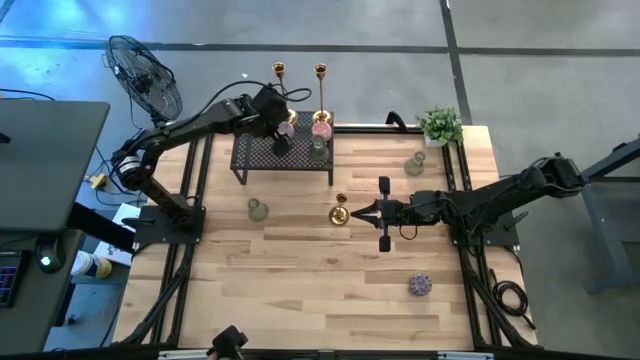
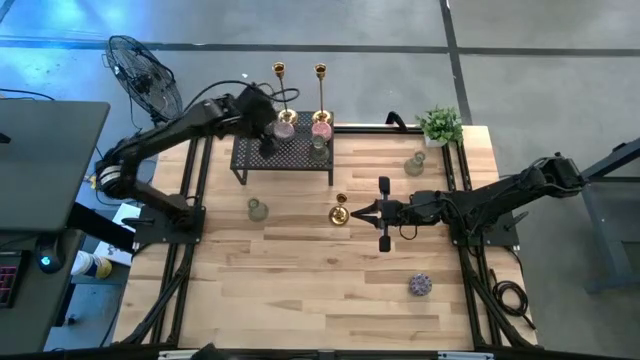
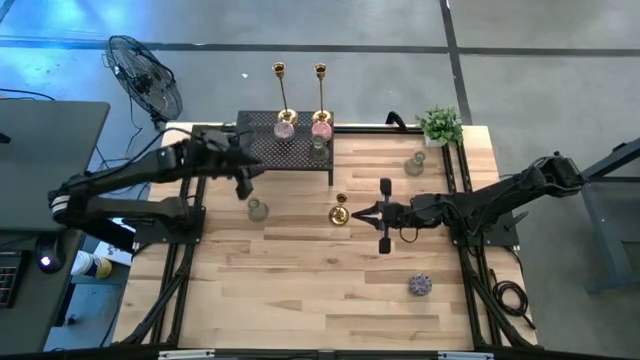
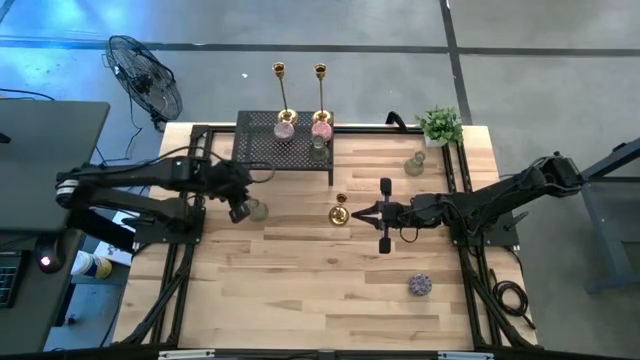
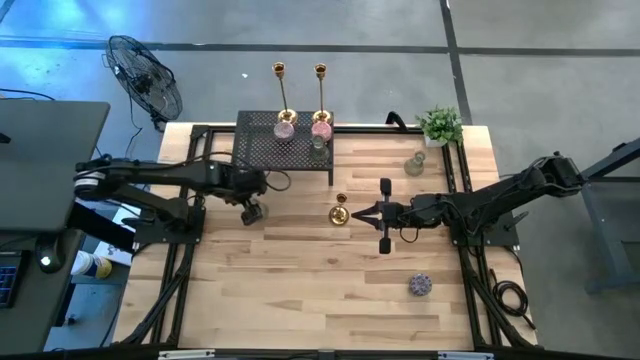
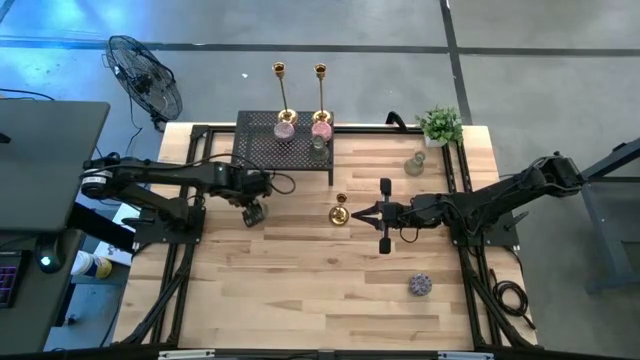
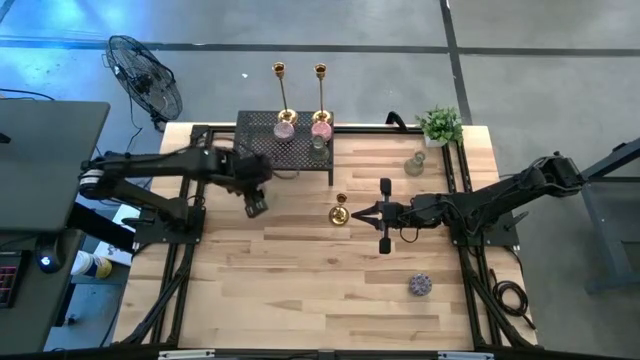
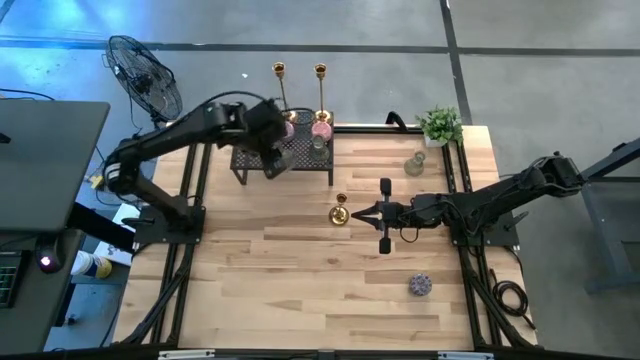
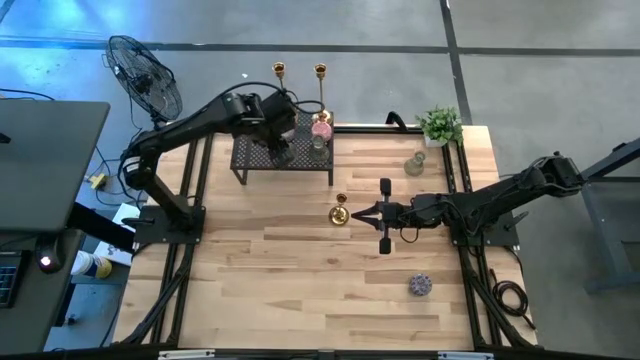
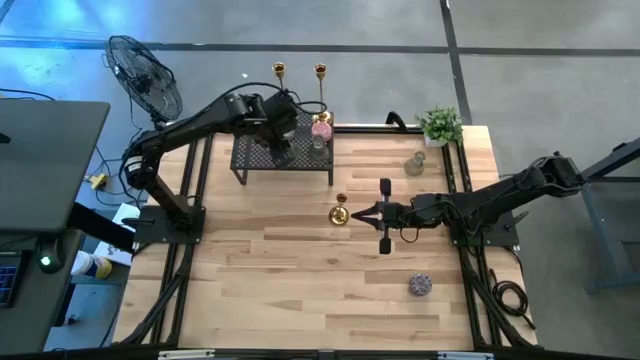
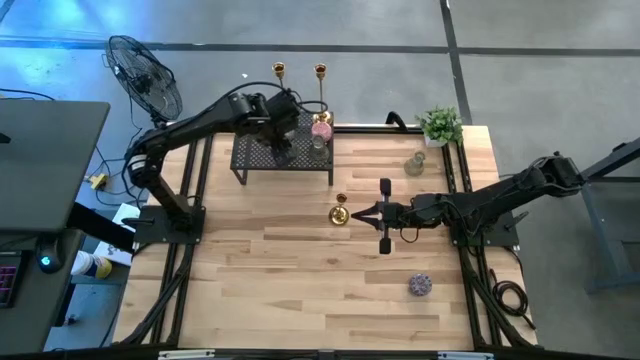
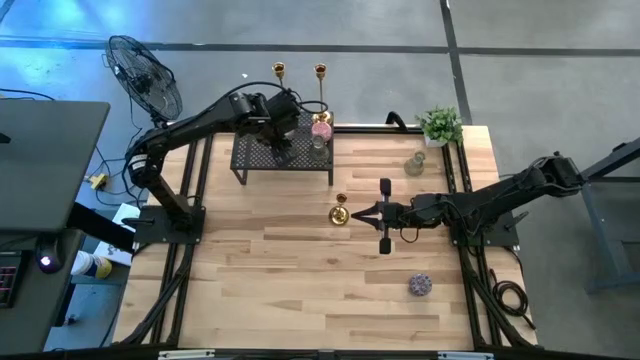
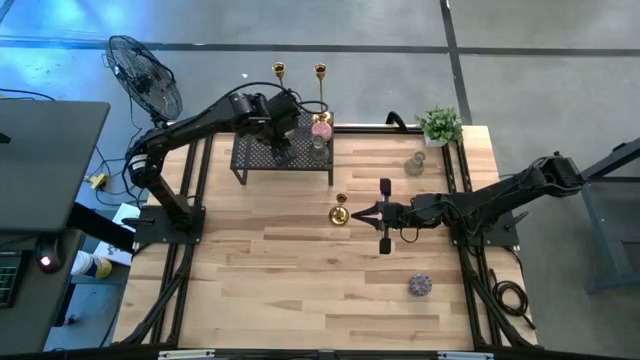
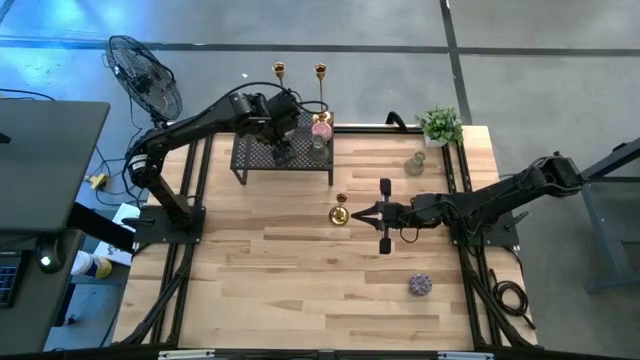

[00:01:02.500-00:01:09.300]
Task: Pick & Place candle stick holders
Put the left green glass candle holder on the shelf

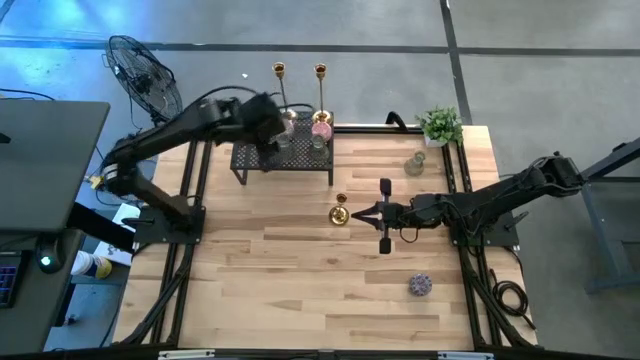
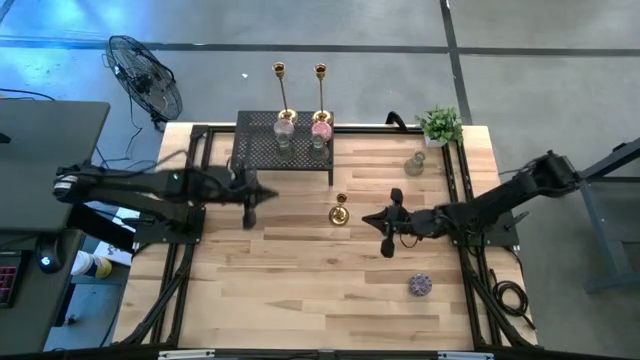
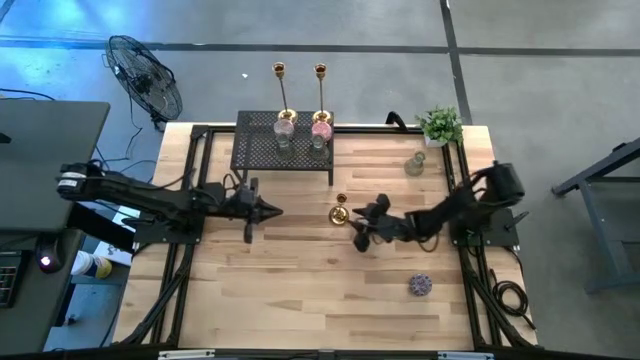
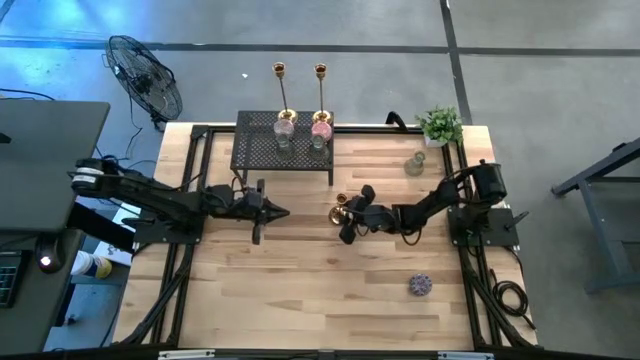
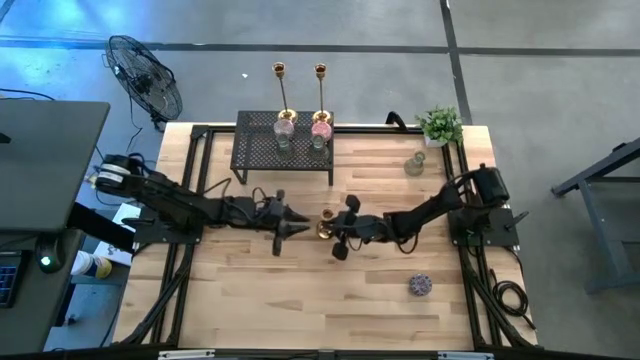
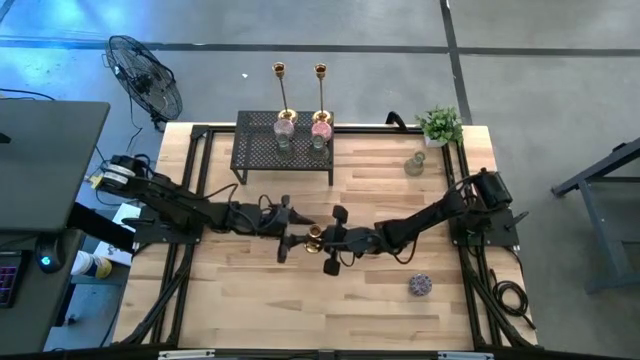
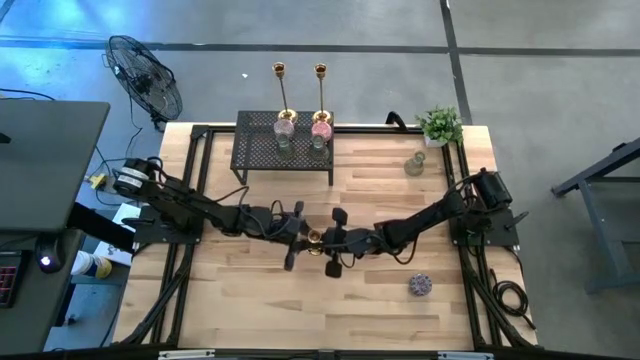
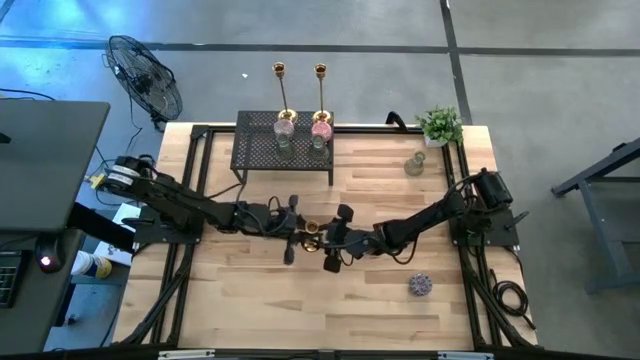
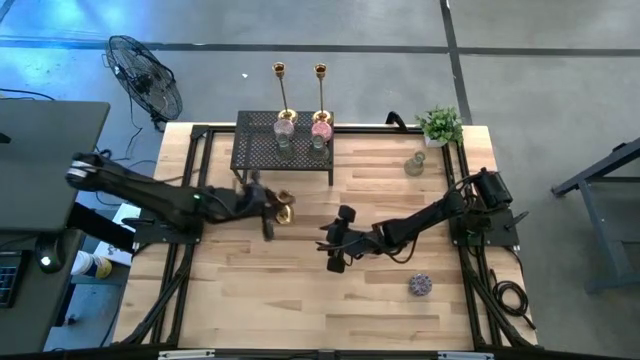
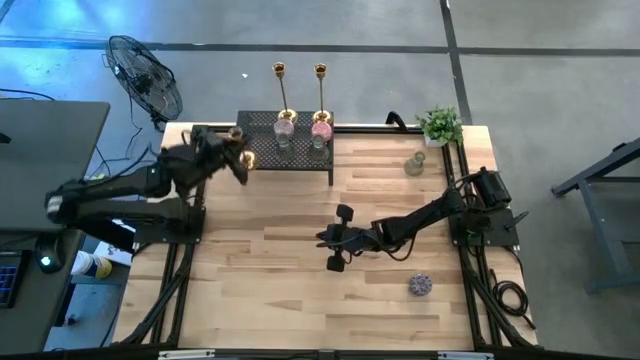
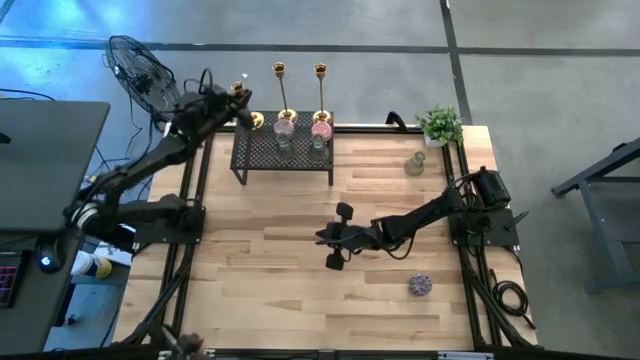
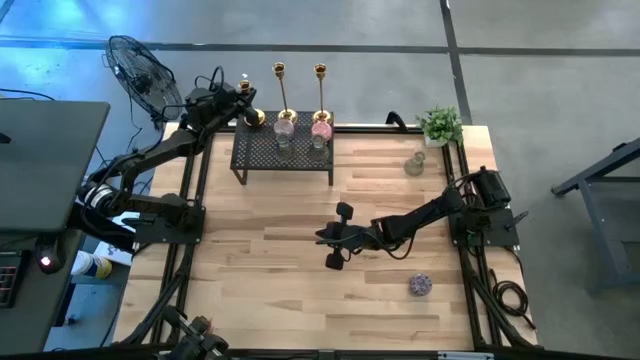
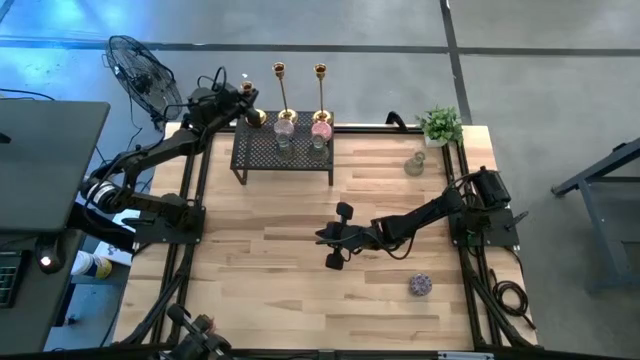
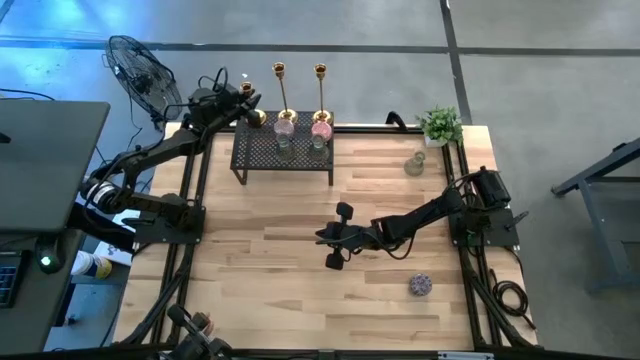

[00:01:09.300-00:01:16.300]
Put the gold candle holder on the shelf

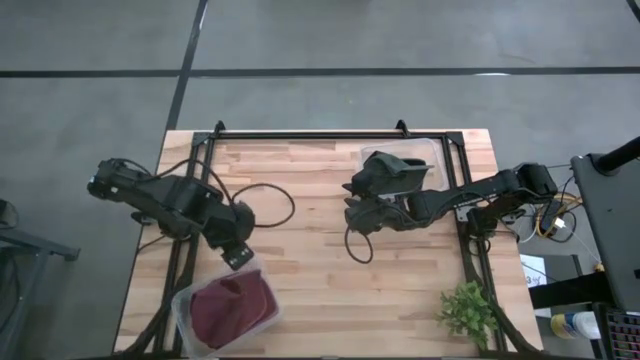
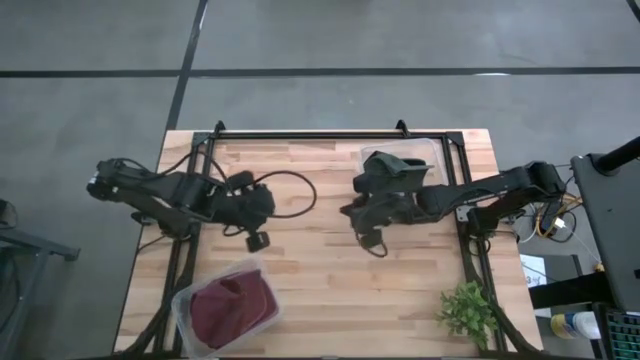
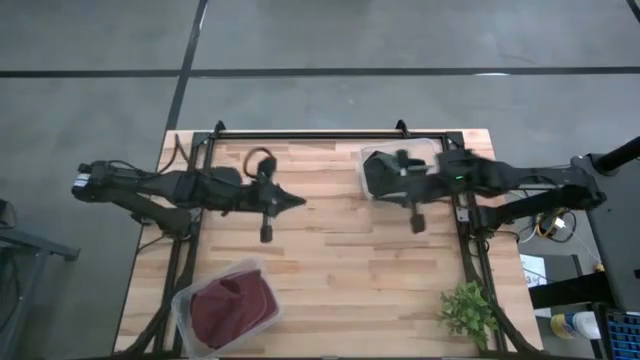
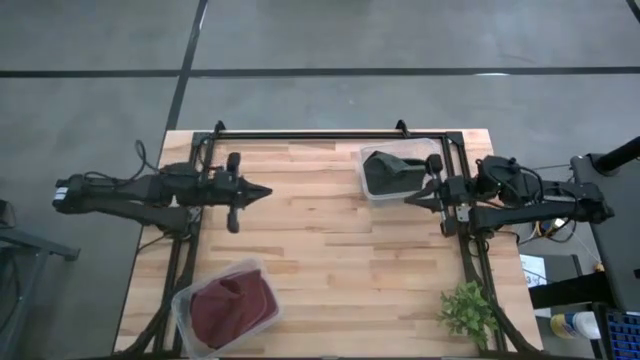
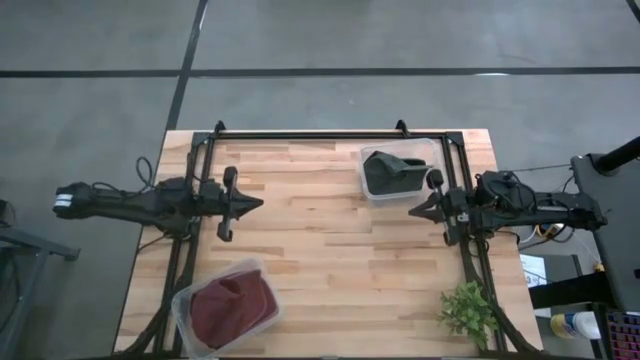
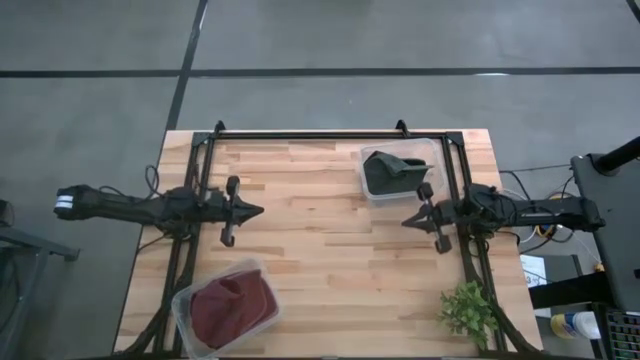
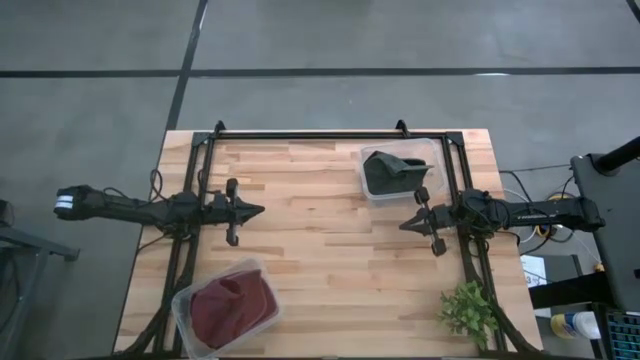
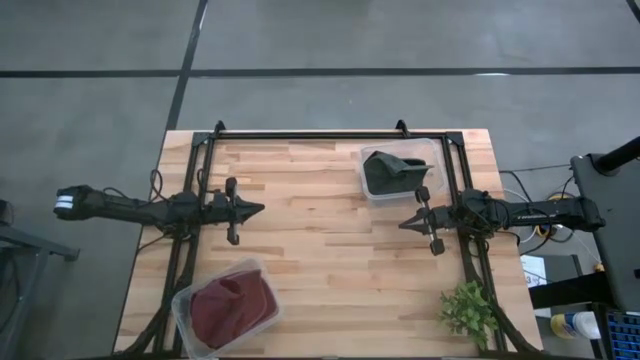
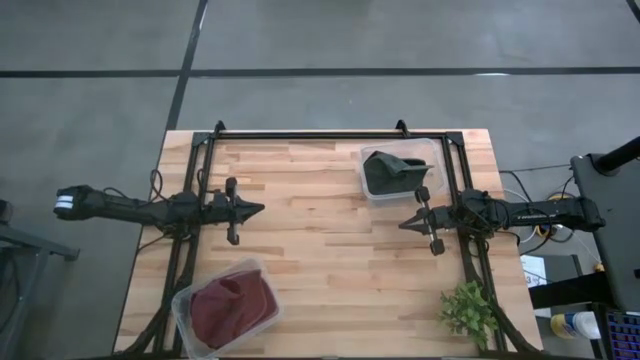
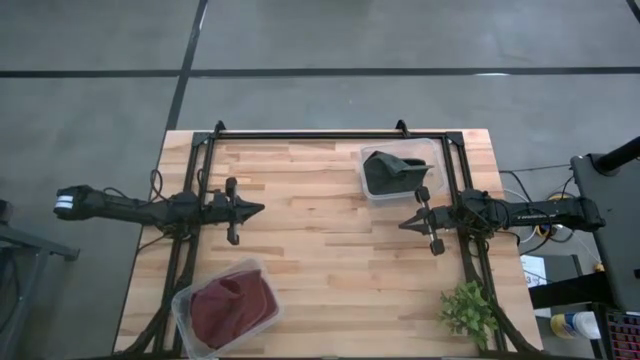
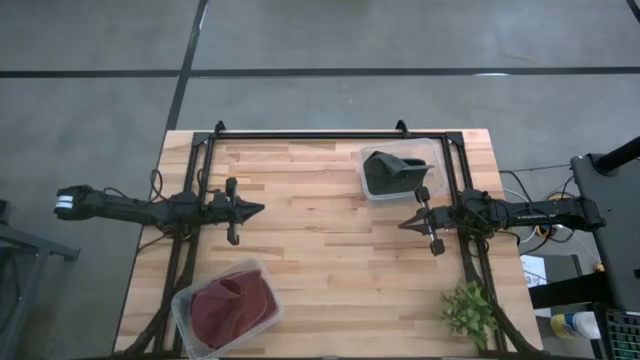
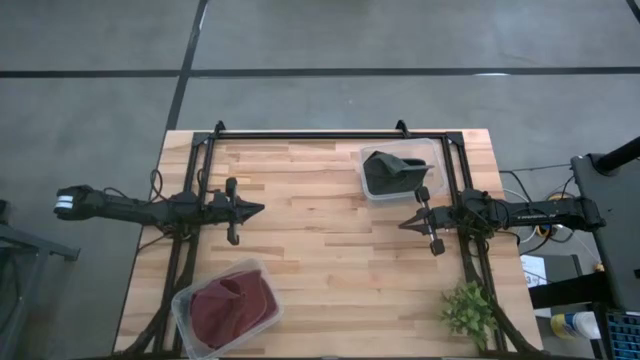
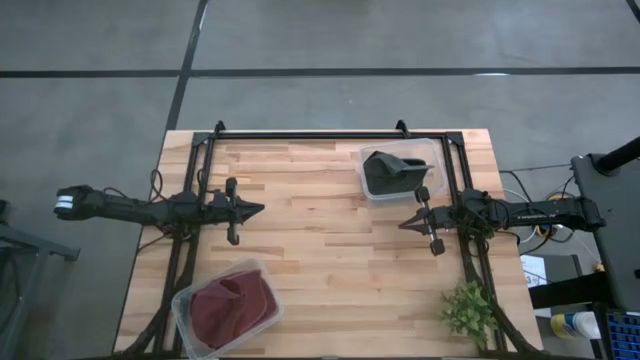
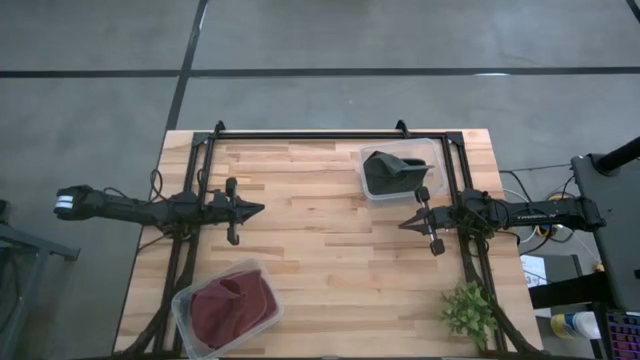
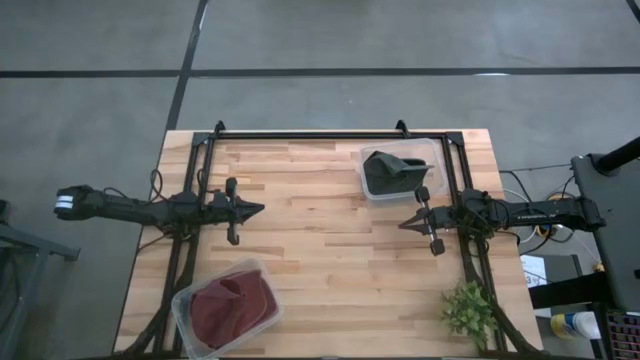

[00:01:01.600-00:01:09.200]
Task: Pick & Place hat
Return to Home Position
